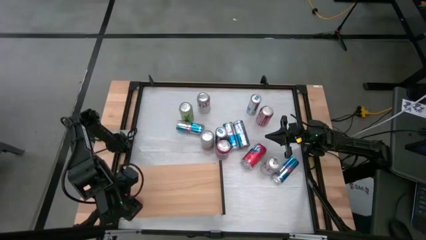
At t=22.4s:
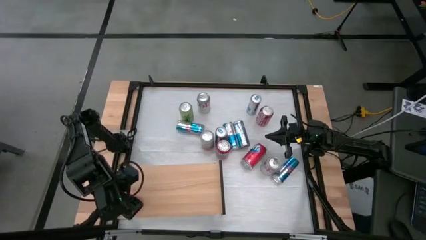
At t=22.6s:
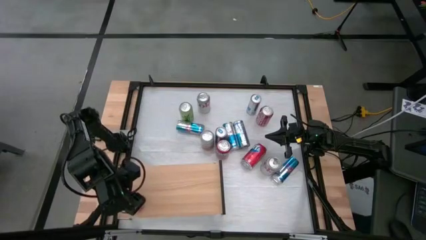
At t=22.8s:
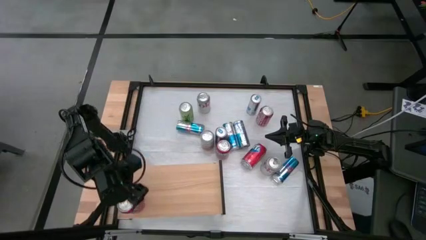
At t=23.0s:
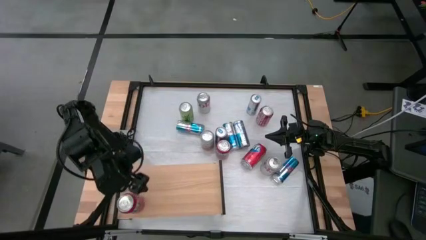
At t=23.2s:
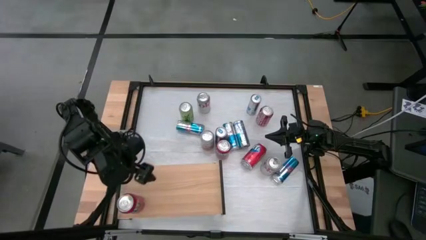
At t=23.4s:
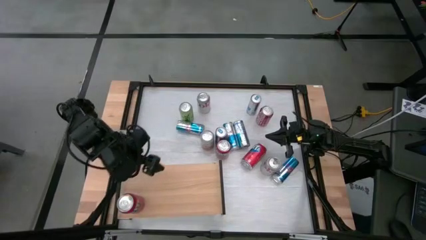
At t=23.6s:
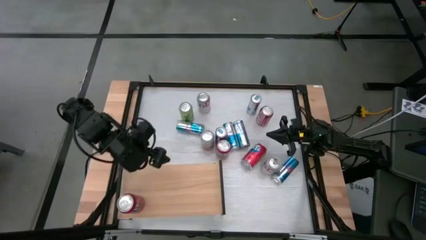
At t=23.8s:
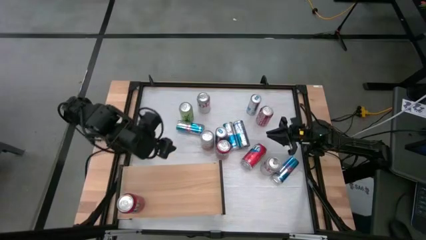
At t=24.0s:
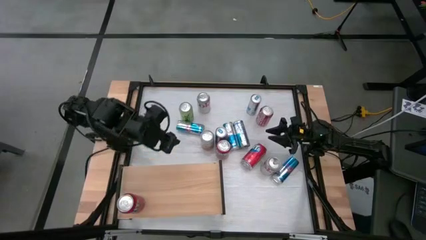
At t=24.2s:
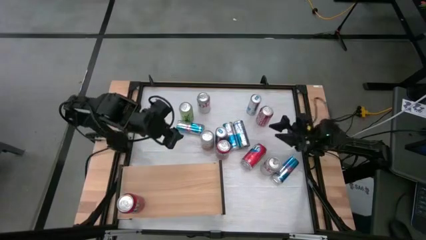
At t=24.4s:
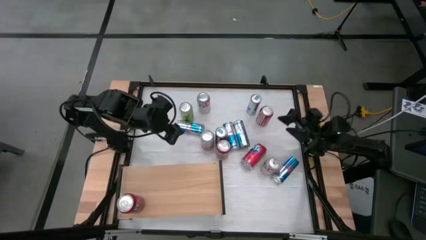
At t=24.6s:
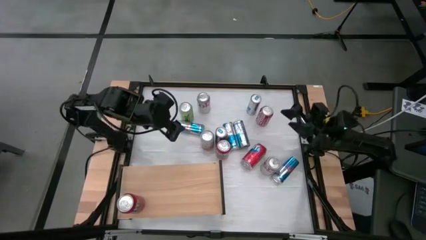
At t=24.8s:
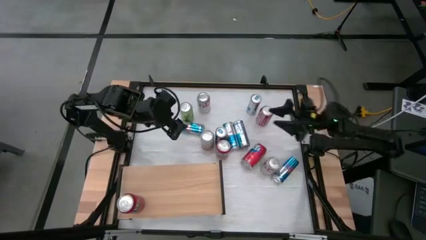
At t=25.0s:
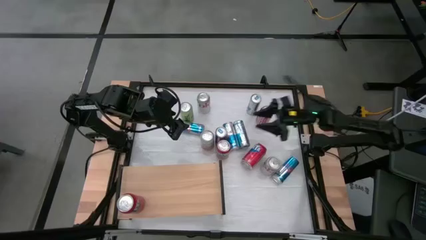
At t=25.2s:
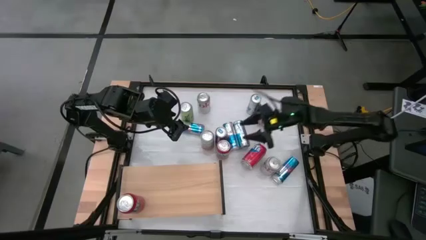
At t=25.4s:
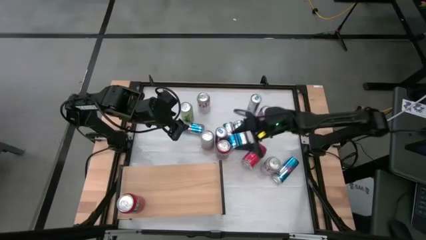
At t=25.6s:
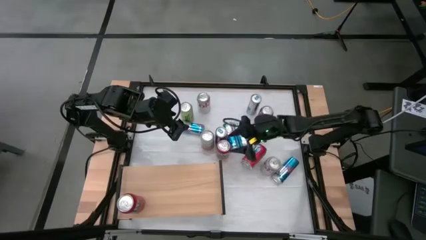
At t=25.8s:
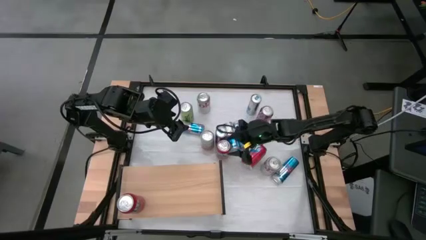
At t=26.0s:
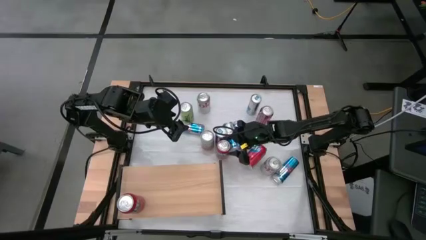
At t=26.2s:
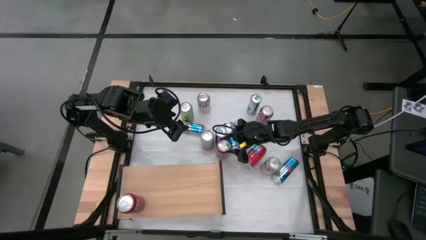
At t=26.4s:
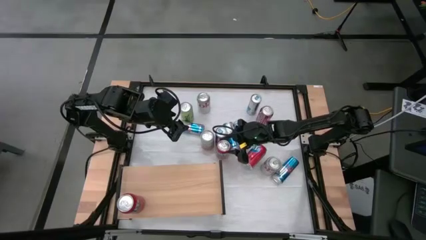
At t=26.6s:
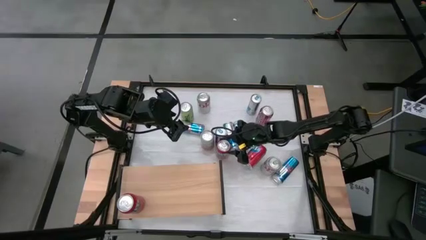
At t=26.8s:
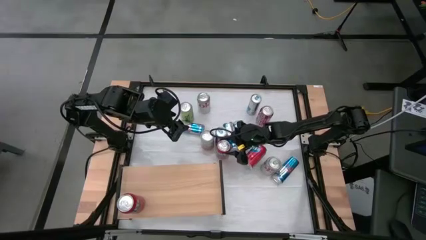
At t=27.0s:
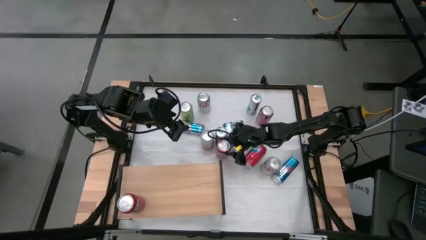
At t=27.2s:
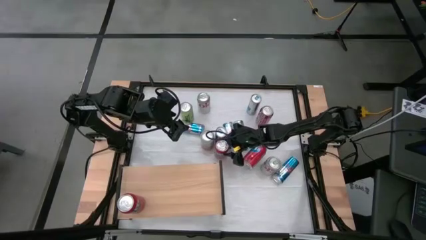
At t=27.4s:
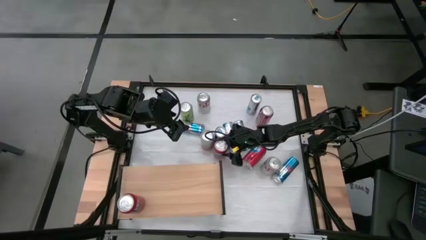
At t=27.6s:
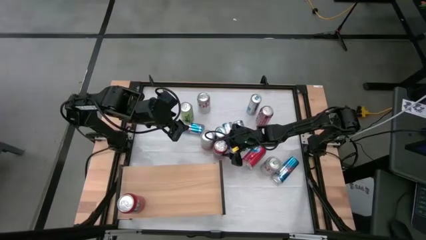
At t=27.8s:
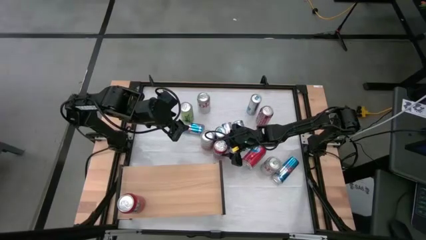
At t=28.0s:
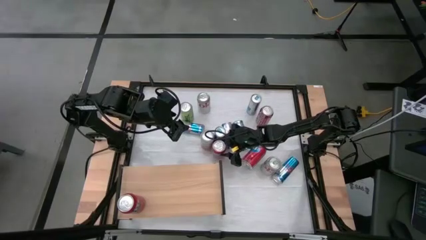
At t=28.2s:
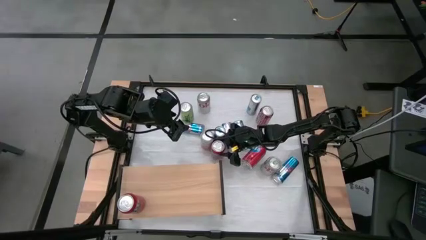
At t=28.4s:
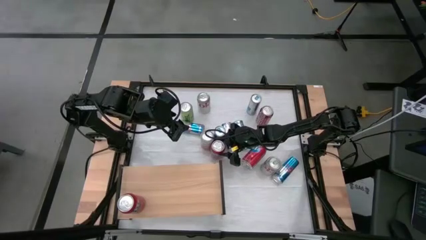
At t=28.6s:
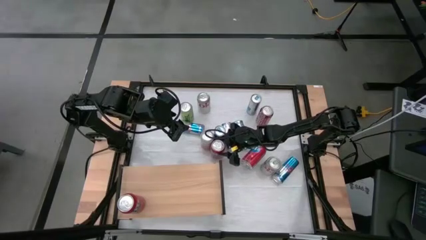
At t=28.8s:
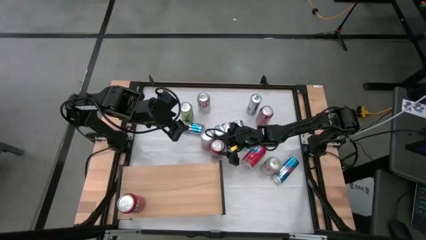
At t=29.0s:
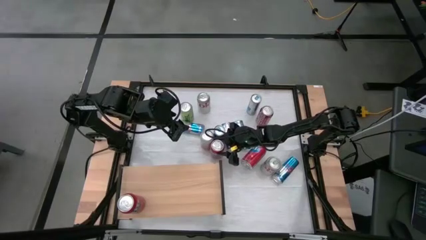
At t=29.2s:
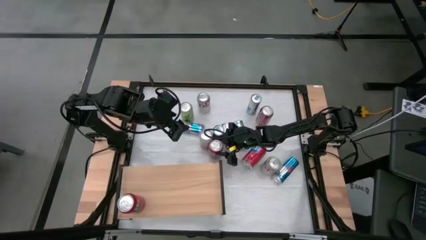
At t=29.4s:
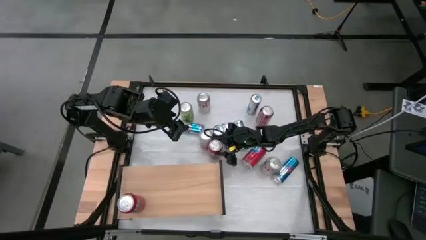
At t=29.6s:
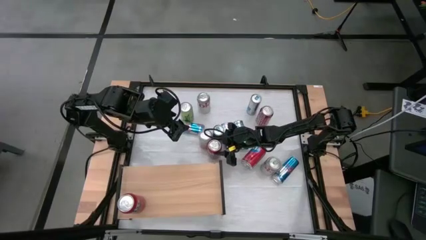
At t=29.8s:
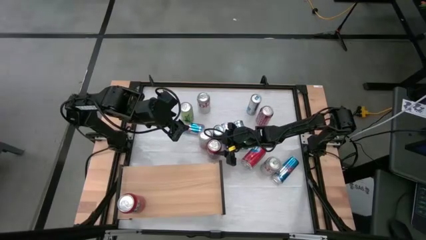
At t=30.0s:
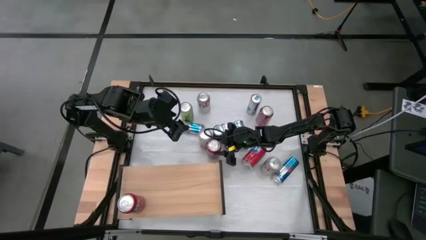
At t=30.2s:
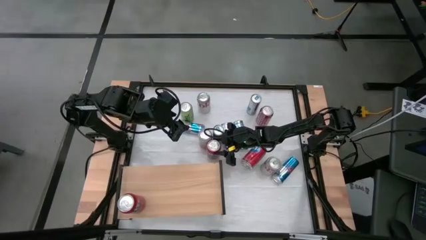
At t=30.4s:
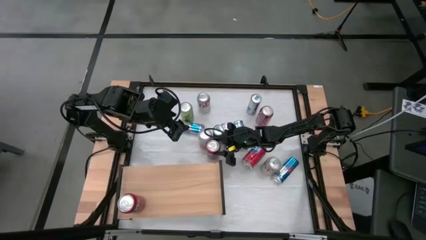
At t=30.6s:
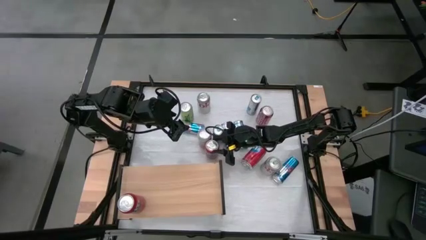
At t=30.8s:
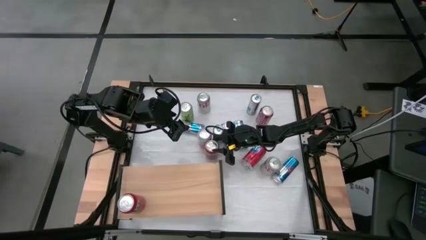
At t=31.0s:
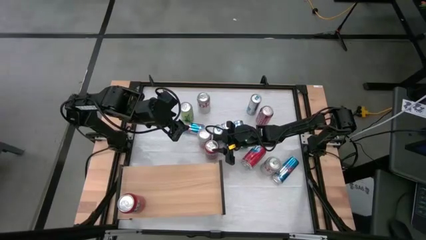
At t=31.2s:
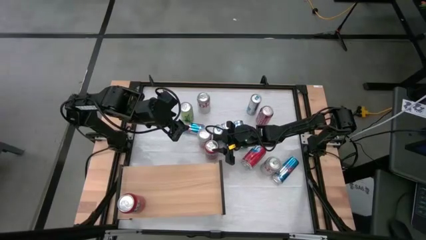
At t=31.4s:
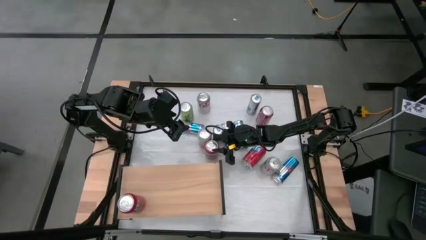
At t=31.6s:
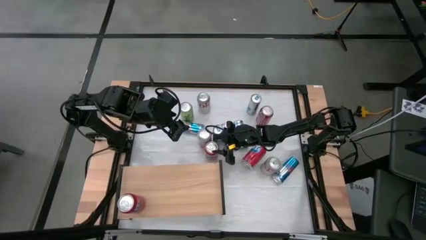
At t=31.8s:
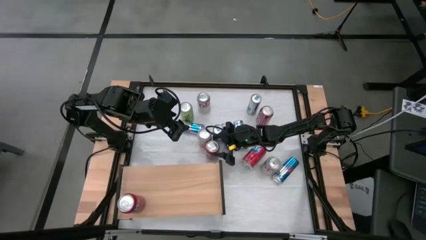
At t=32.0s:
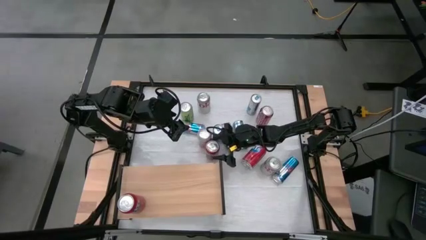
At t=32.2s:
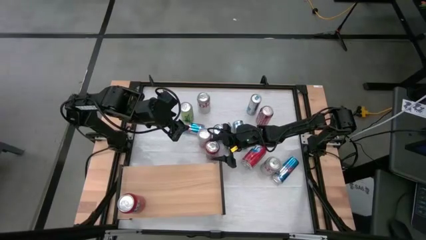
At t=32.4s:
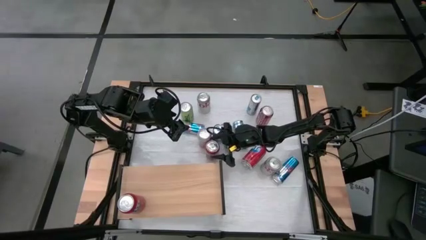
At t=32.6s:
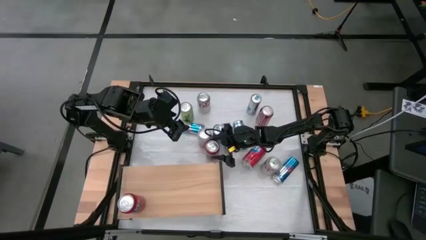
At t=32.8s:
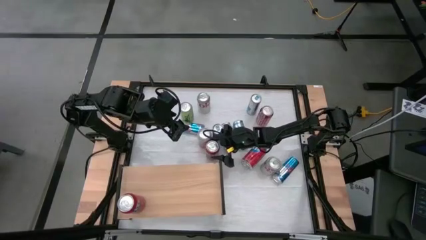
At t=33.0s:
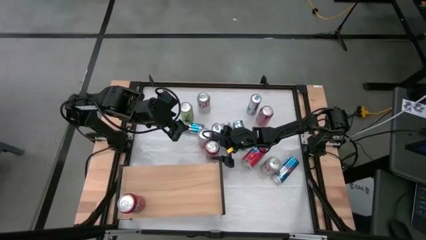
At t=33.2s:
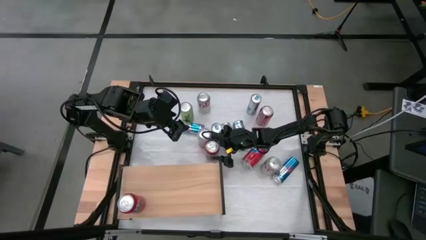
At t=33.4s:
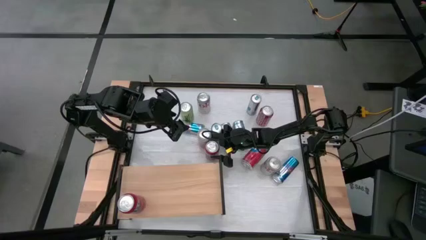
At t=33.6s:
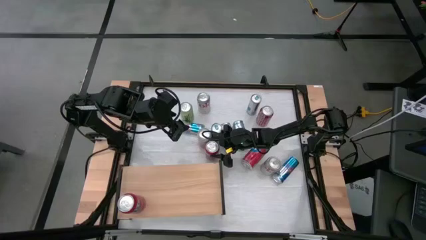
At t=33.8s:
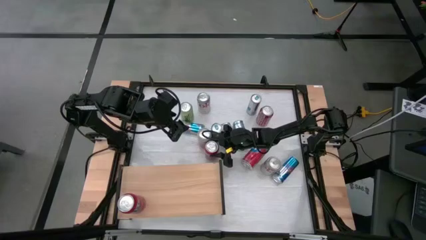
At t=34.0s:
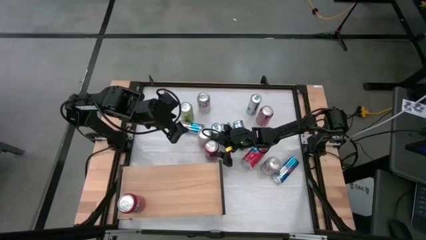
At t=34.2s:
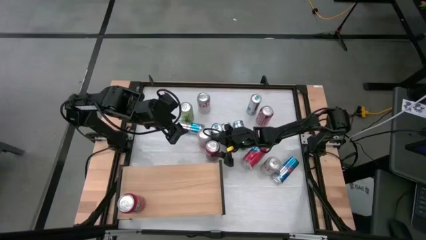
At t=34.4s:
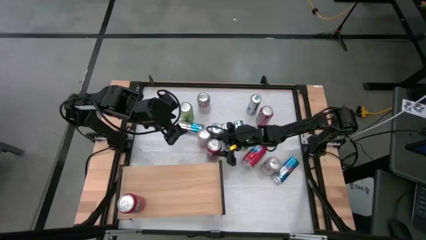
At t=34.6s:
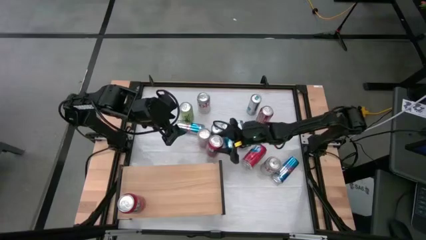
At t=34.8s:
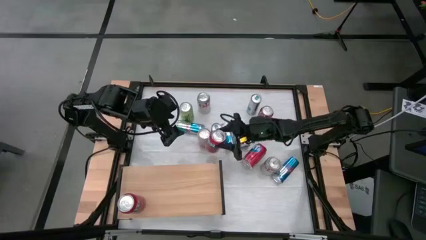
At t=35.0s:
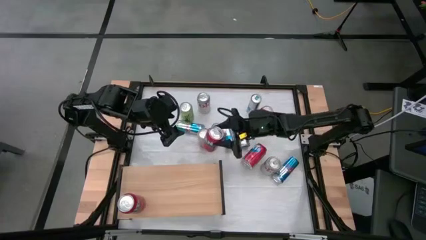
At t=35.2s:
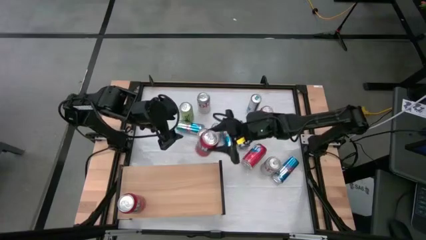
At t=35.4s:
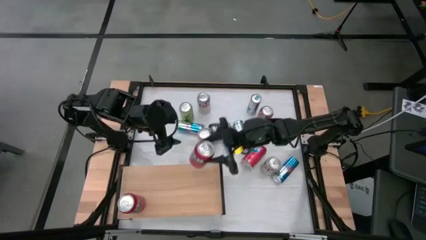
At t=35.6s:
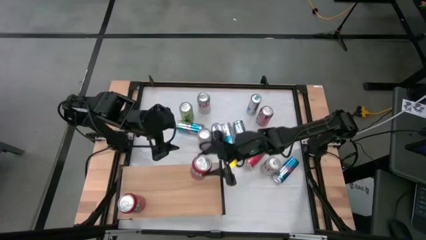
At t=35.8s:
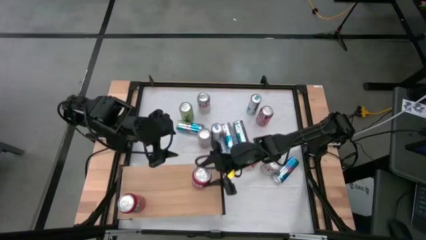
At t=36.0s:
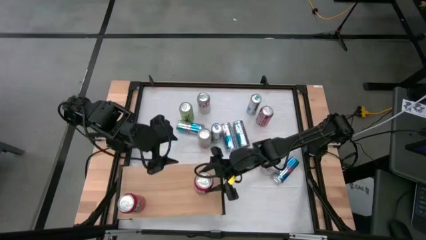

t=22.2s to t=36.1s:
Task: Place canned beverage on shelf
Put the orange soda can on the shelf aligned with the orange soda can

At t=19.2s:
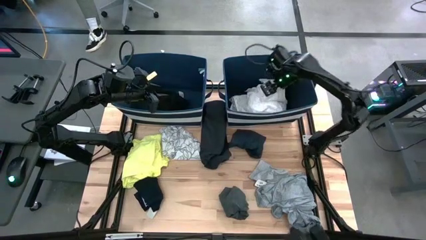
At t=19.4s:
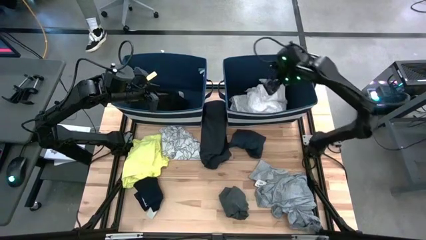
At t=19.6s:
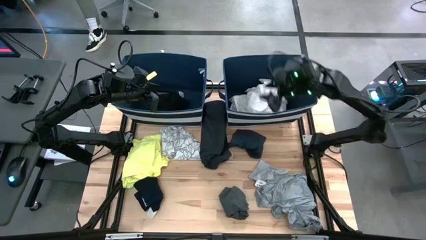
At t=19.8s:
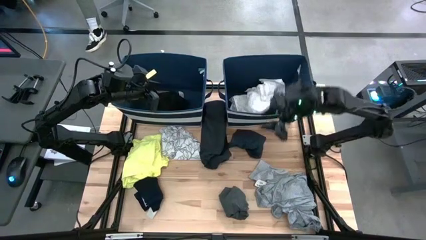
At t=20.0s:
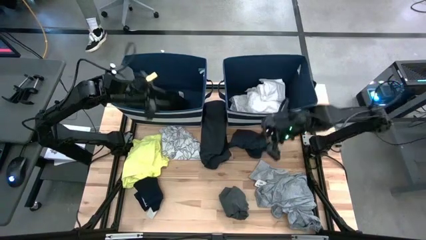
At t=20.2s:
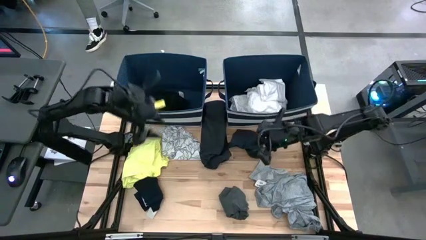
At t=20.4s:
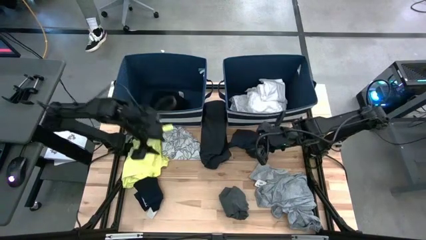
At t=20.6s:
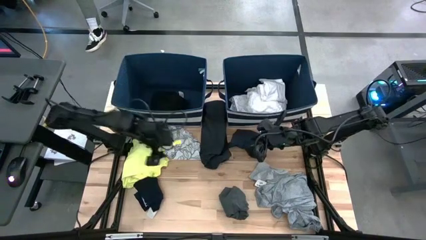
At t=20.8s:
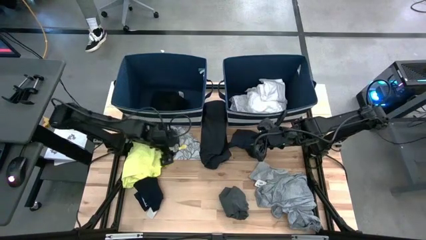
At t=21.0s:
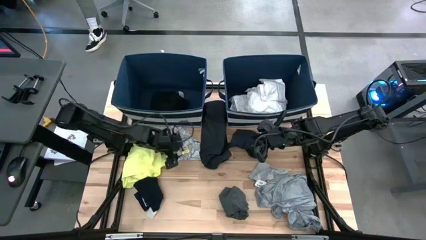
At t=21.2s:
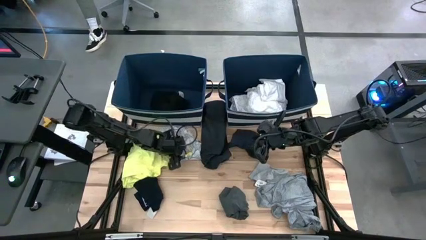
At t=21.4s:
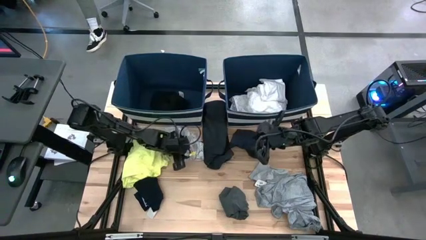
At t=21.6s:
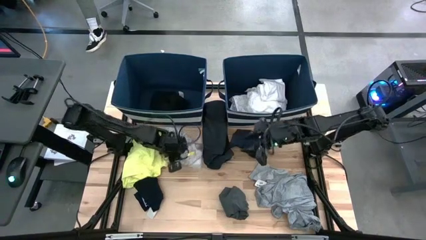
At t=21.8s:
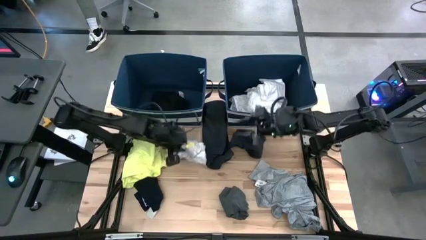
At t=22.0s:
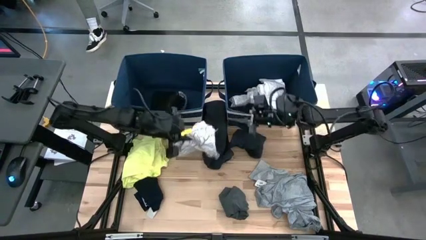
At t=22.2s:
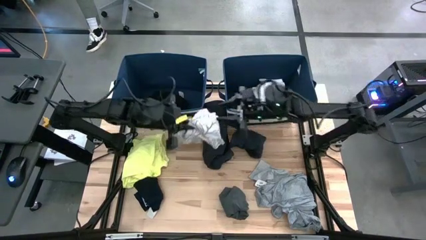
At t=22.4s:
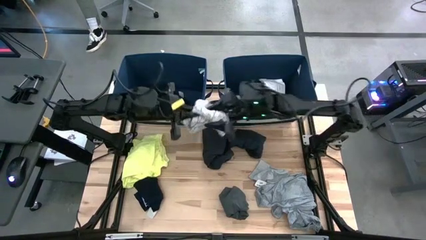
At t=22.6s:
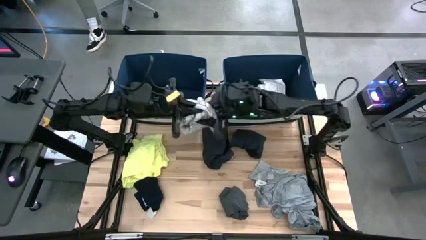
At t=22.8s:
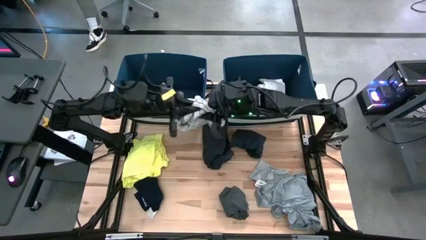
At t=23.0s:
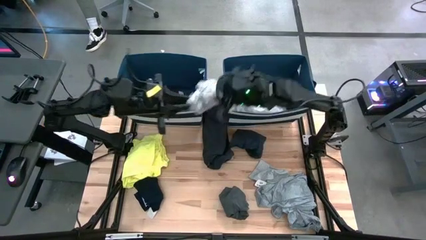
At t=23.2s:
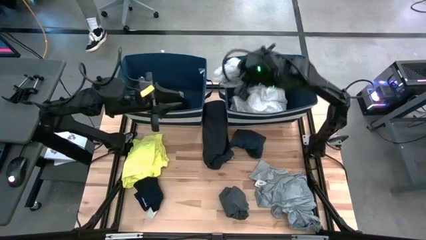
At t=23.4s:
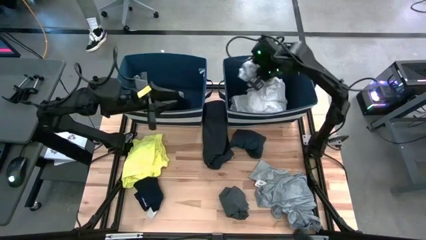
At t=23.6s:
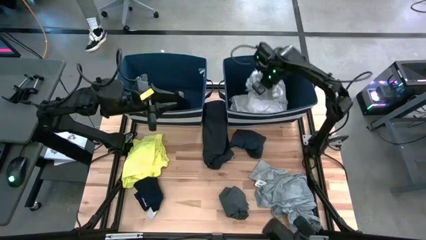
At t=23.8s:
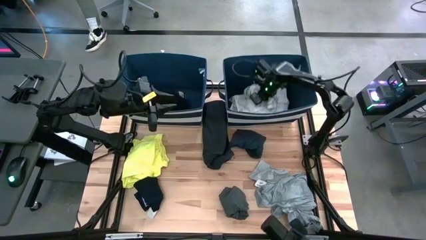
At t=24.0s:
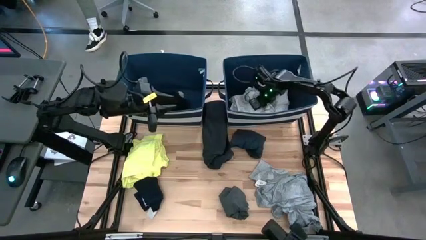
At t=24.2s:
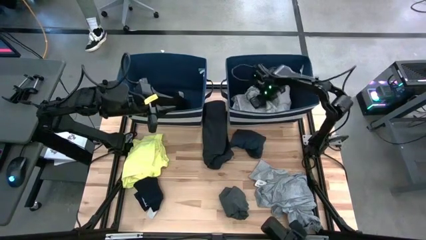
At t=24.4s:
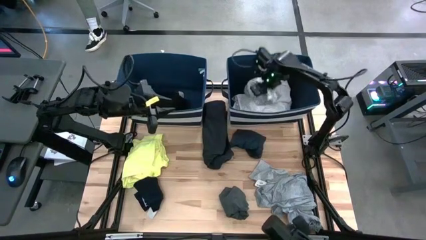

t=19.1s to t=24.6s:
Task: Sort clothes
Put the white pattern shirt into the right blue laundry bin
